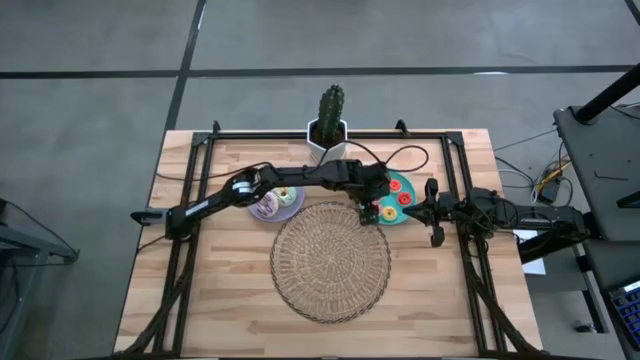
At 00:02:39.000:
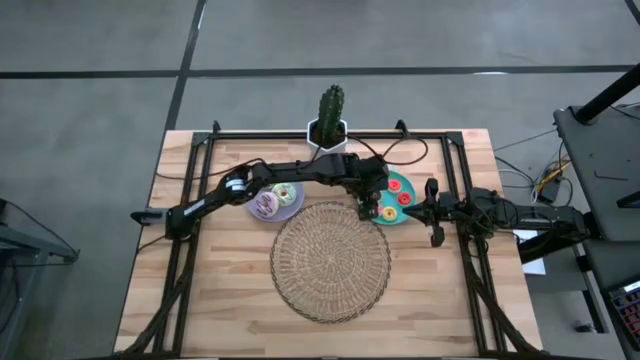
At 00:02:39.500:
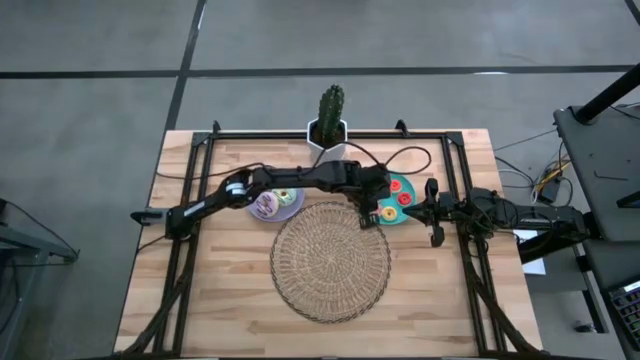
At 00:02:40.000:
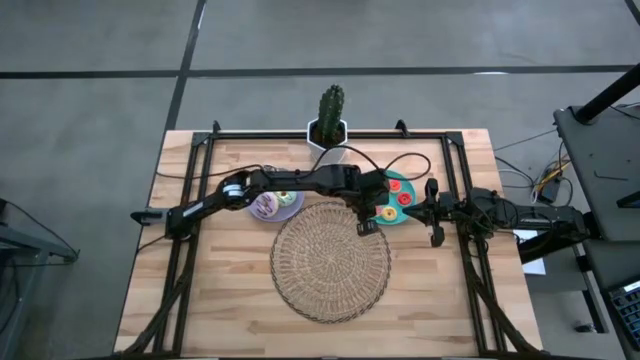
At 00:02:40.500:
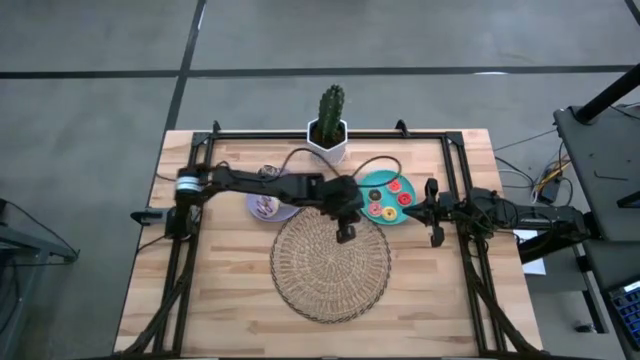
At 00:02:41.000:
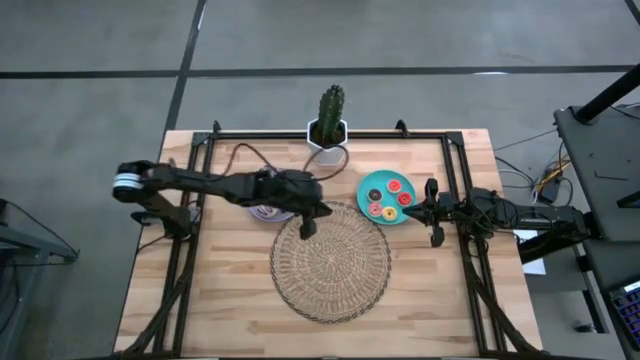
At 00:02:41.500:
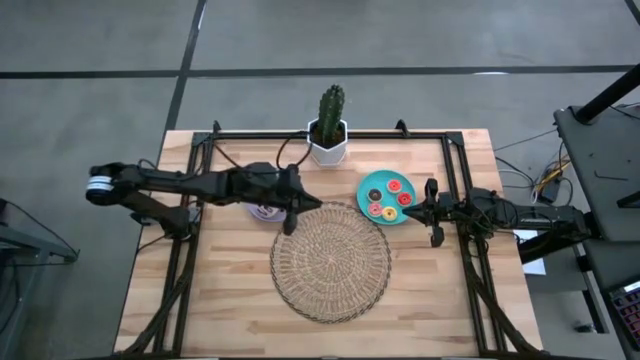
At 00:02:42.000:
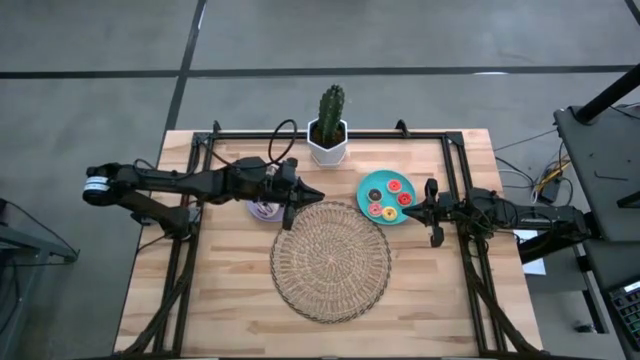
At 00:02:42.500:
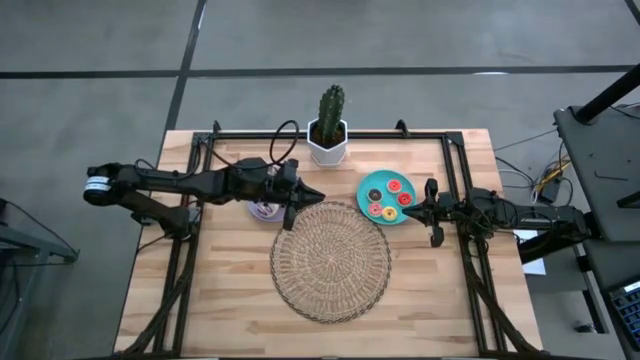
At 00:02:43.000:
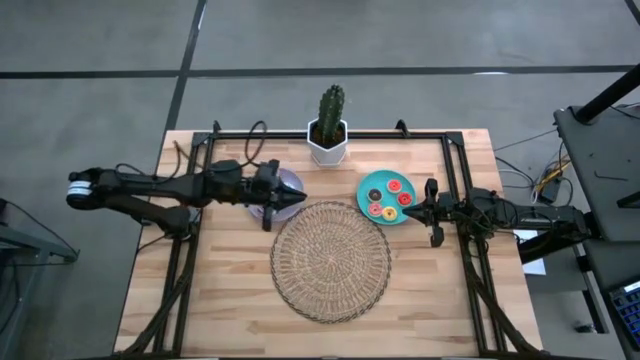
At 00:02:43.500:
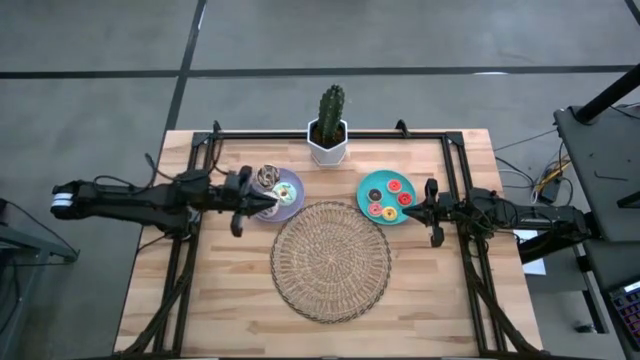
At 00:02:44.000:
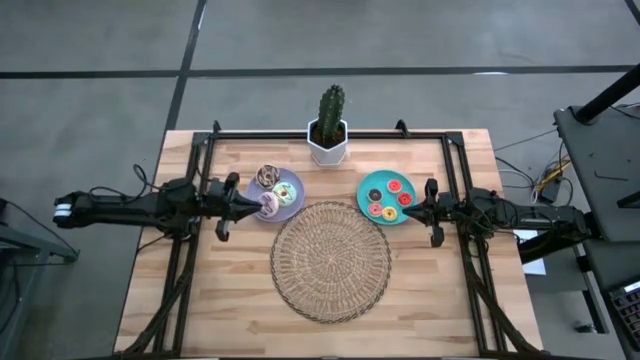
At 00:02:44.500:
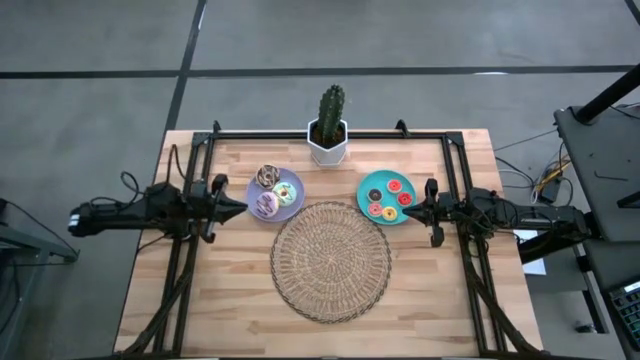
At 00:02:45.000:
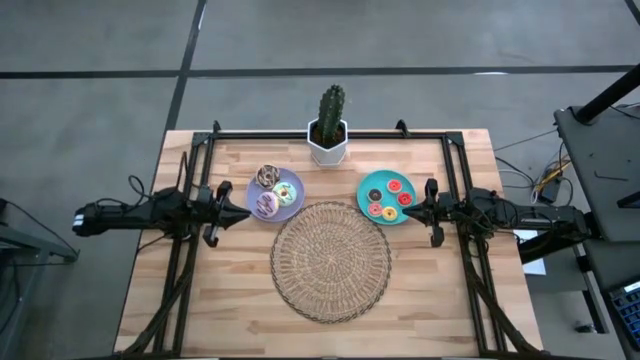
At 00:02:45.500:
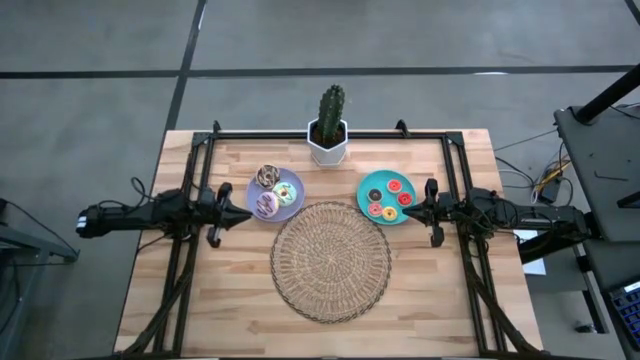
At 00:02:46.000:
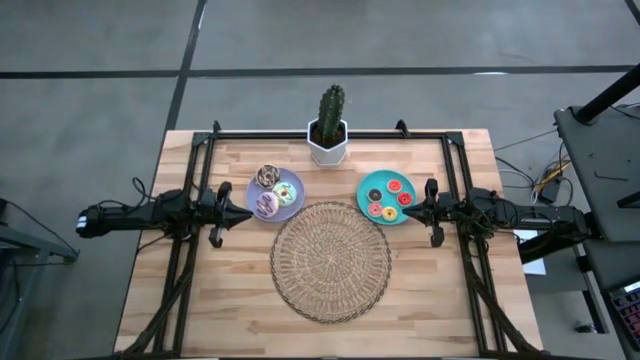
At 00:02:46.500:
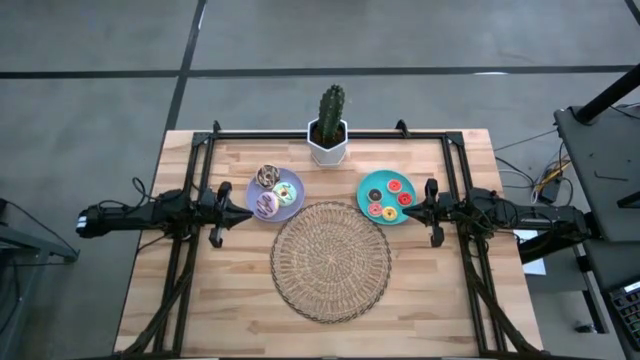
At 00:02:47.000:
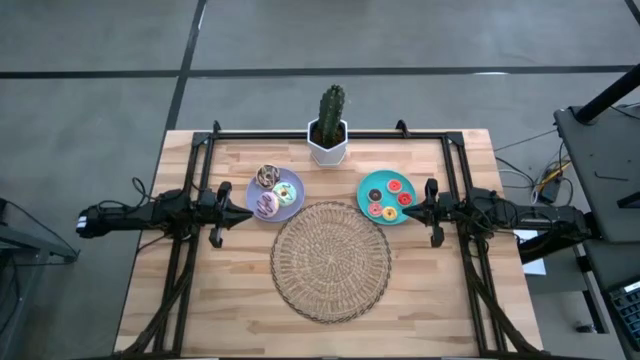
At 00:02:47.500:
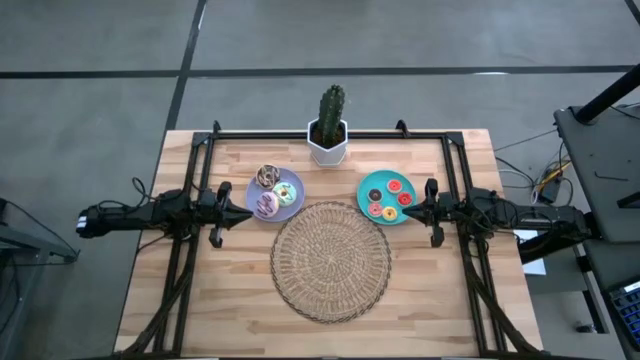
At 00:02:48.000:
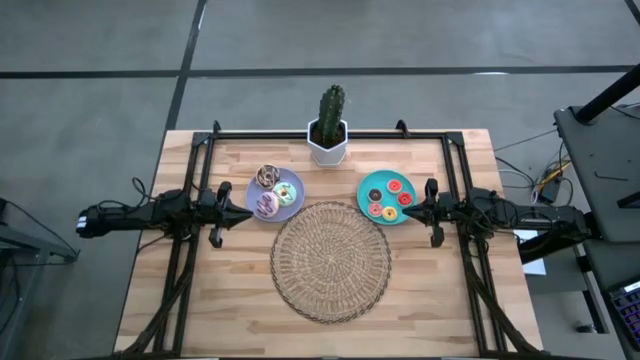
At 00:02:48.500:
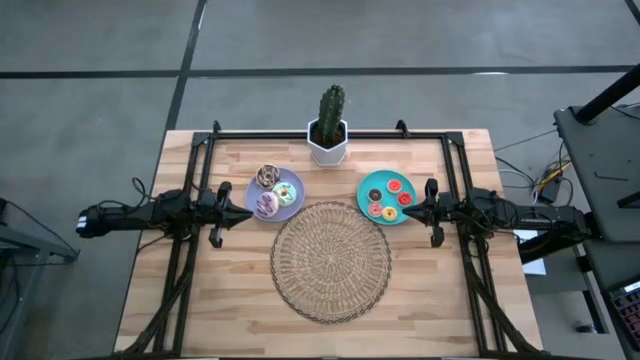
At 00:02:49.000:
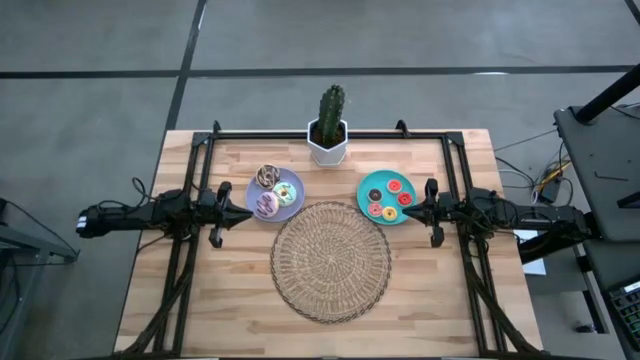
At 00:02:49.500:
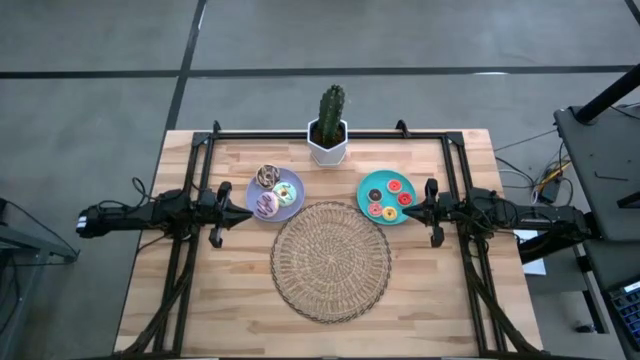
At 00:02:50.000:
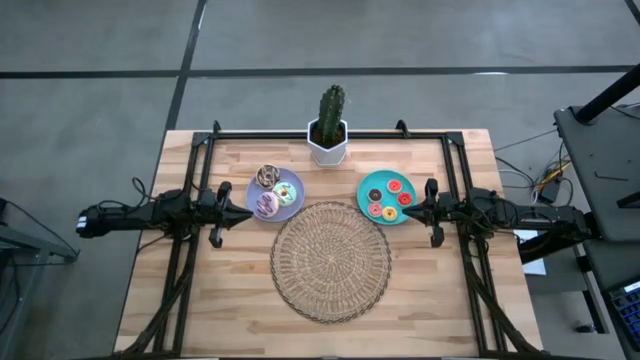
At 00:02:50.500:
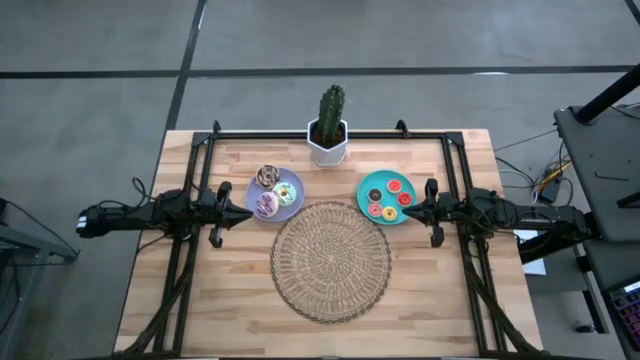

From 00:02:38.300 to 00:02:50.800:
Task: Pick & Place donuts
Return to Home Position
